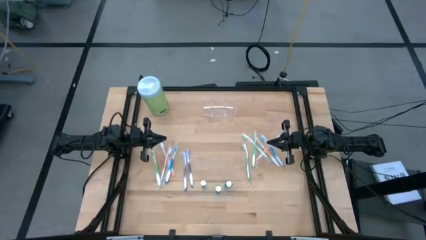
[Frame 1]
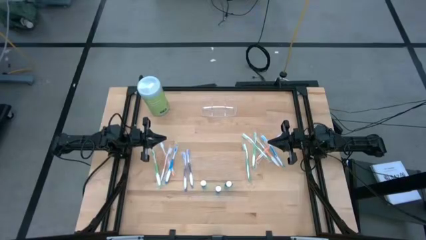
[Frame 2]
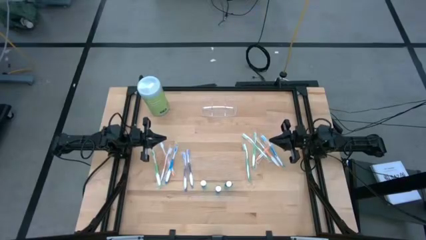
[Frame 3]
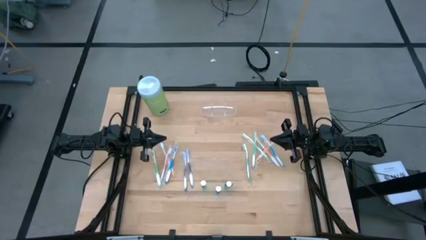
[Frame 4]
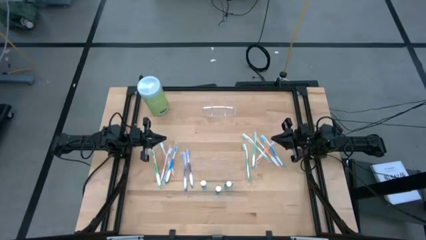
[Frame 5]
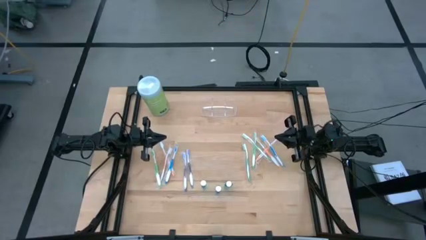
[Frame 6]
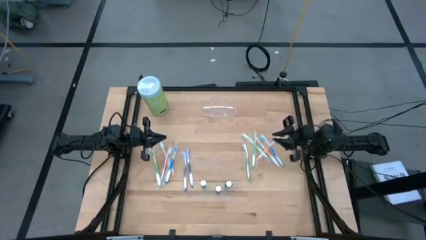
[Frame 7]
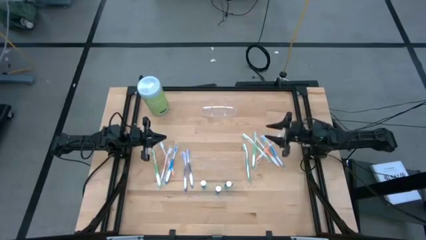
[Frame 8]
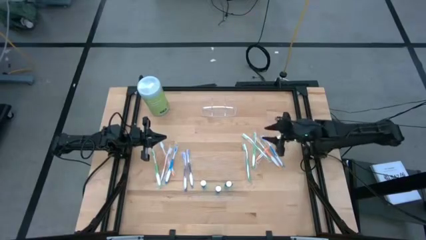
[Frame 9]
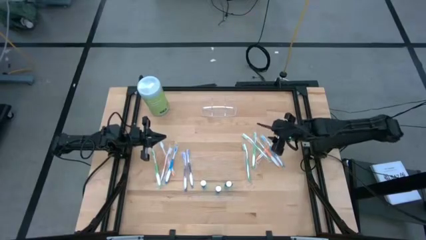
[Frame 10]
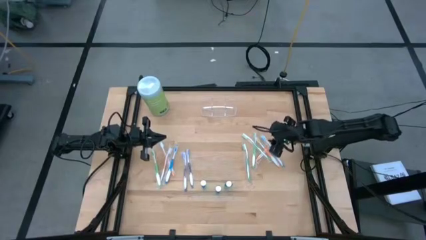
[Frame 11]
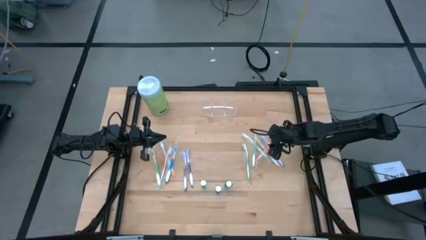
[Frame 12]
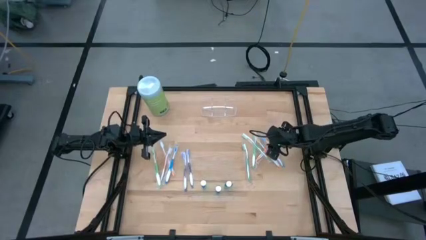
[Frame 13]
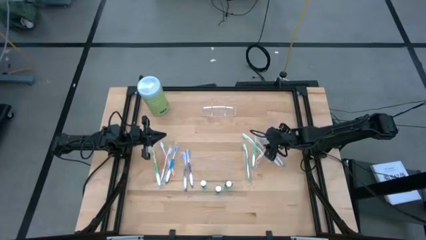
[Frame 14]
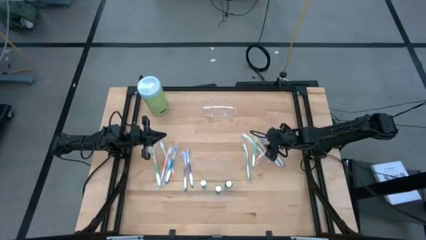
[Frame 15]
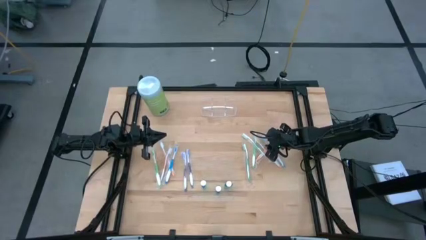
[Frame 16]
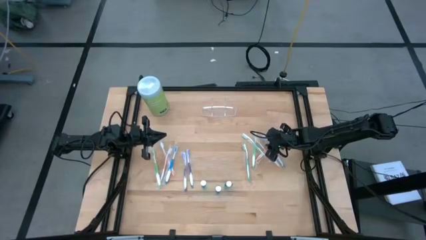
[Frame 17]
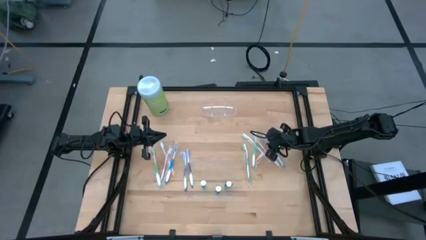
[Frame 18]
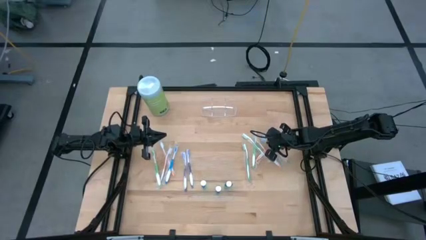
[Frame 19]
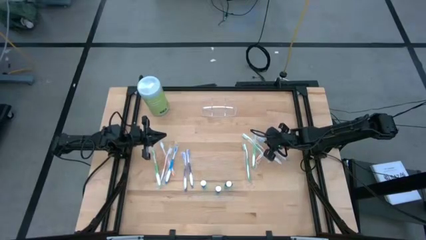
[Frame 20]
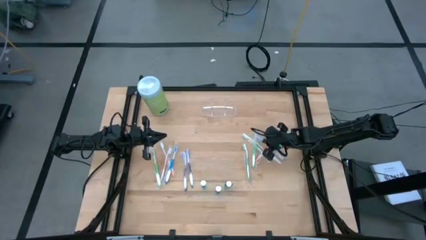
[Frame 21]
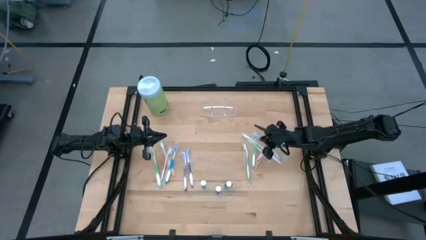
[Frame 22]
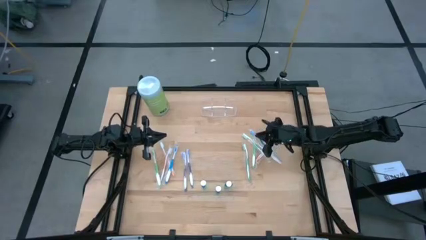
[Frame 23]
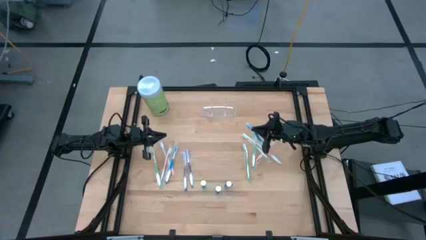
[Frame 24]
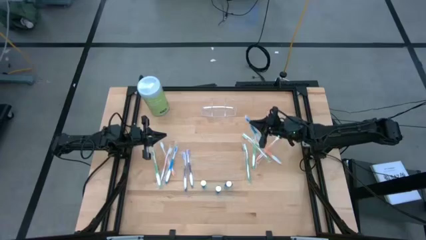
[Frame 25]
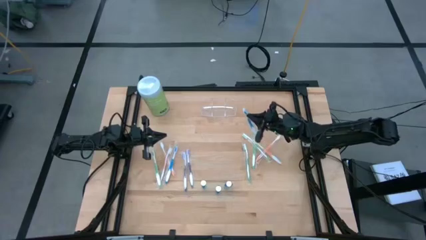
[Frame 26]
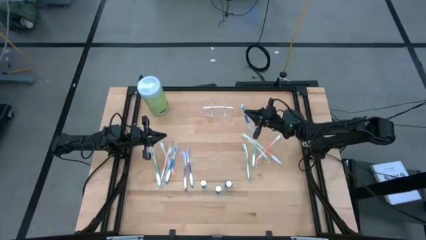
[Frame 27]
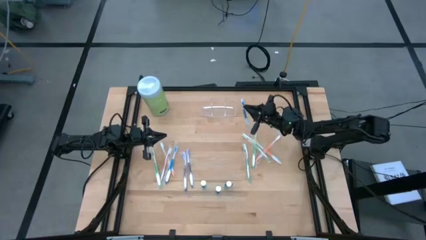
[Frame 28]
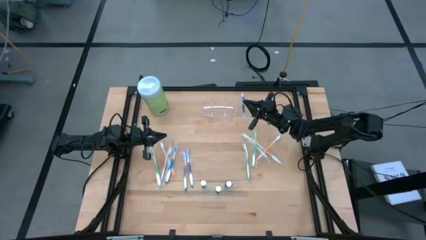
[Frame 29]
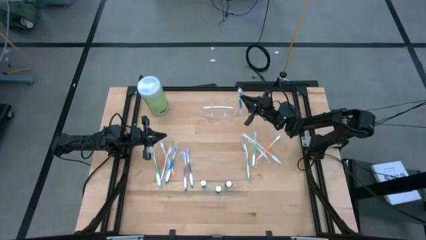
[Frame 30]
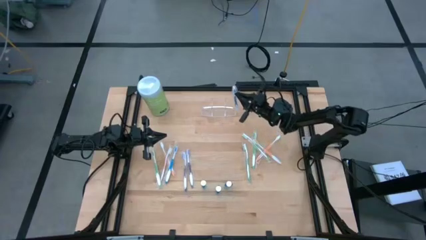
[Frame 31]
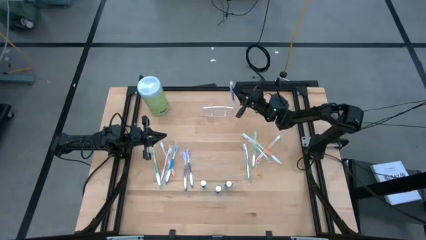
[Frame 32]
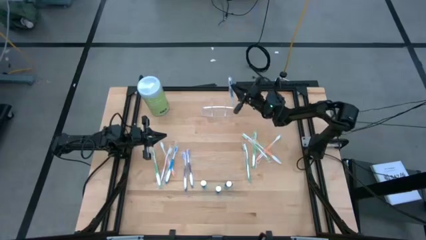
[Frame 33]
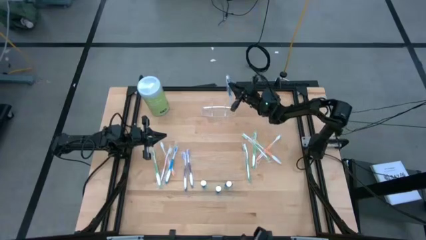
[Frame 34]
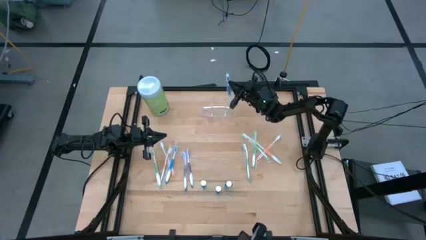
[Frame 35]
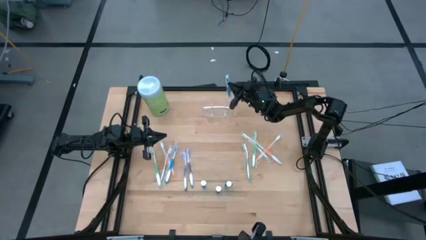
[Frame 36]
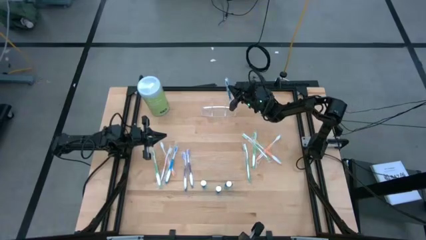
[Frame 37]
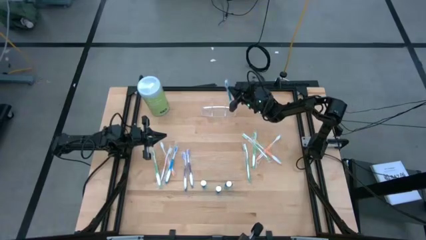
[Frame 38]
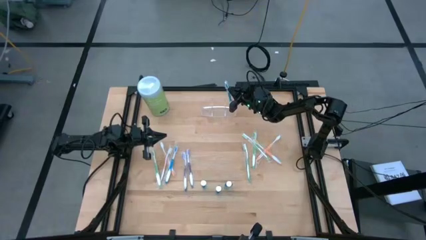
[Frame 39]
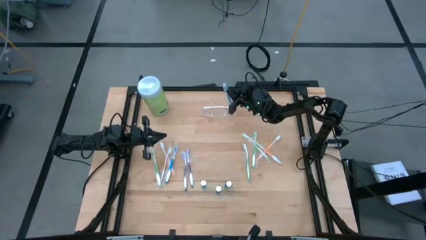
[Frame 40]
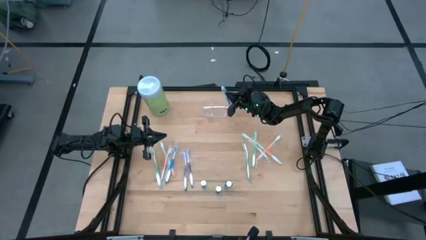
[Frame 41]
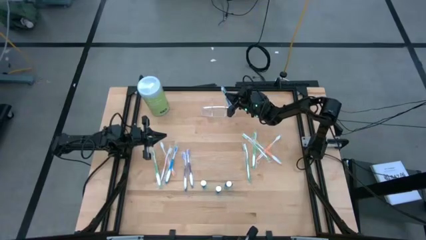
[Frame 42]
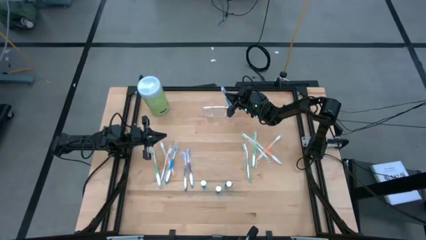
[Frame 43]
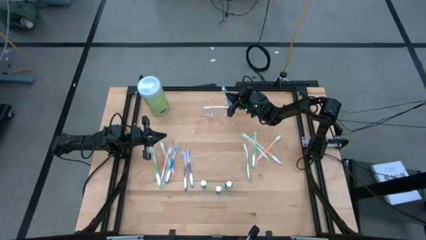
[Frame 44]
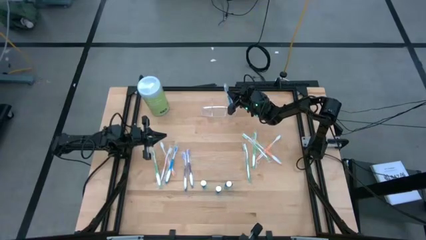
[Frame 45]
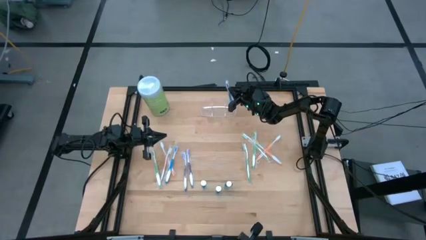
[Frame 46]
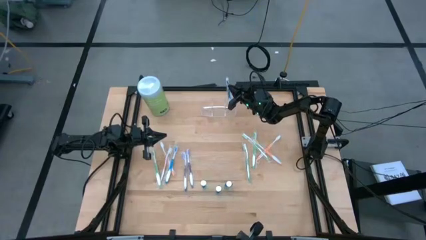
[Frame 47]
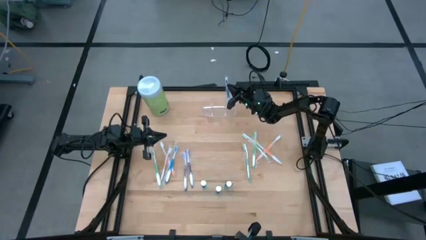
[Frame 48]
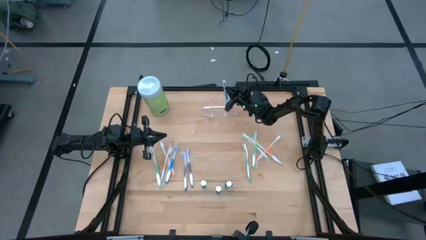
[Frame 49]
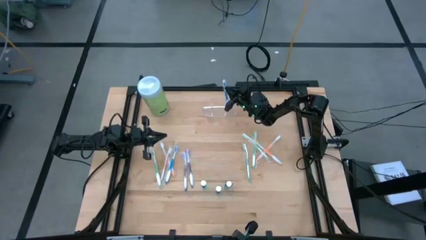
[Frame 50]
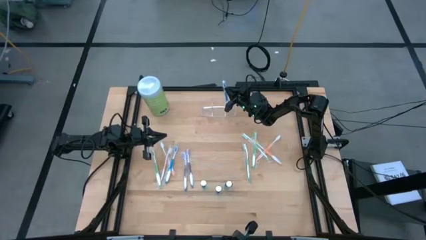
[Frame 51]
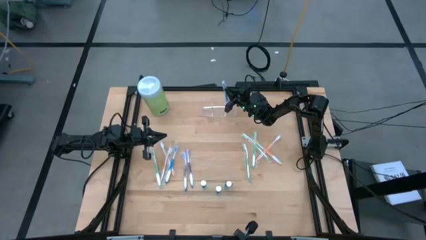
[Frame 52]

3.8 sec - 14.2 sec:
Task: Pick & Place toothbrushing station
Put the blue toothbrush into the transparent organizer

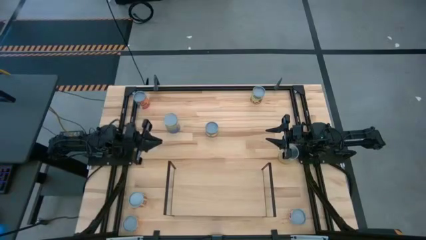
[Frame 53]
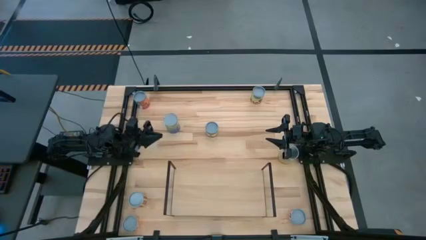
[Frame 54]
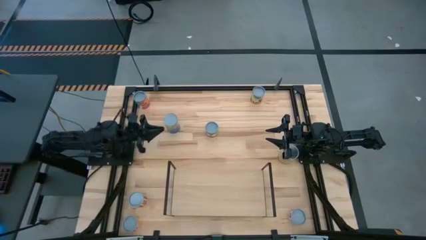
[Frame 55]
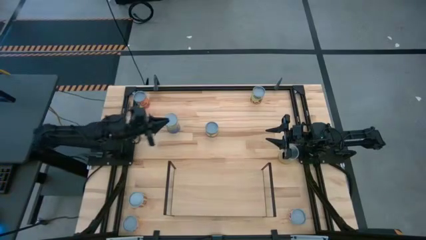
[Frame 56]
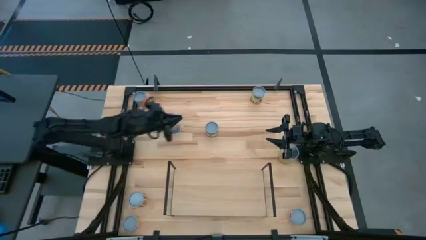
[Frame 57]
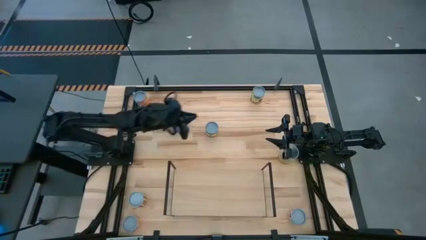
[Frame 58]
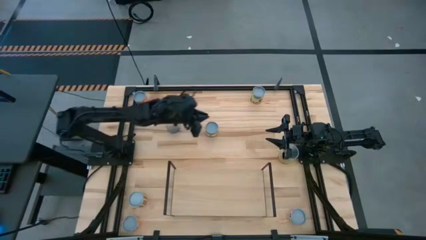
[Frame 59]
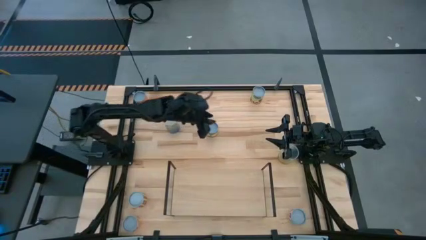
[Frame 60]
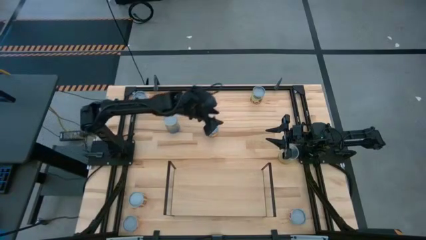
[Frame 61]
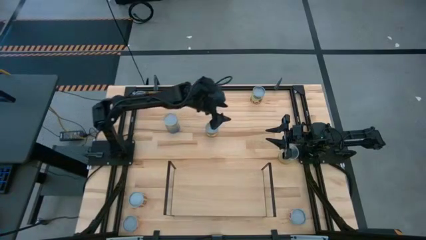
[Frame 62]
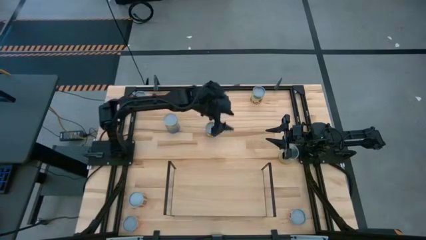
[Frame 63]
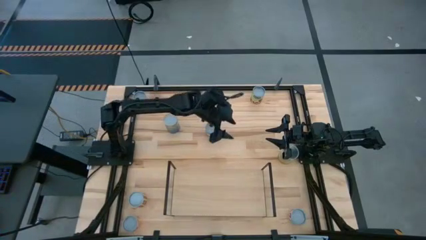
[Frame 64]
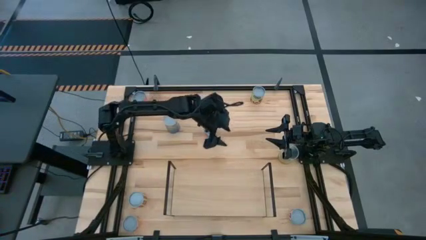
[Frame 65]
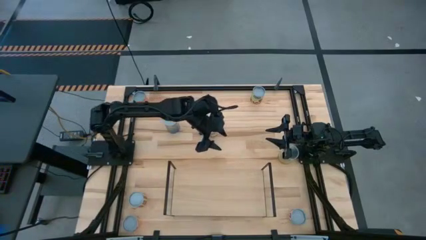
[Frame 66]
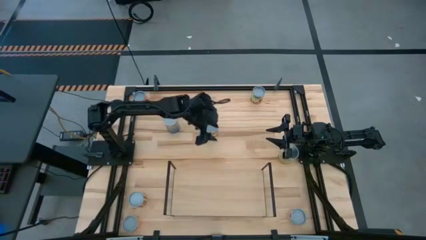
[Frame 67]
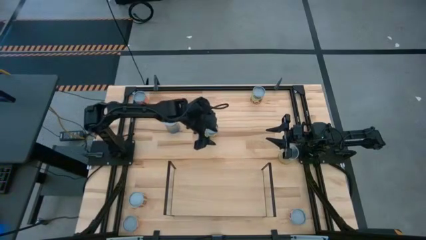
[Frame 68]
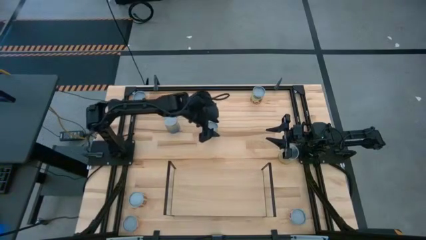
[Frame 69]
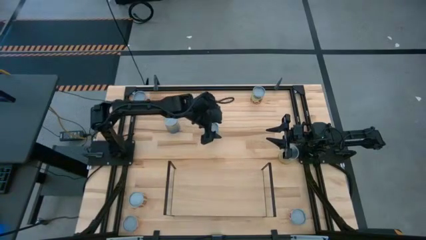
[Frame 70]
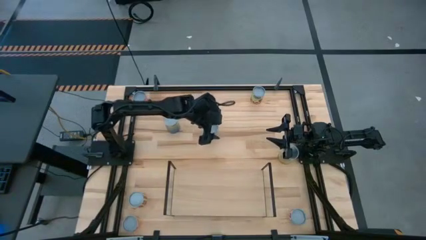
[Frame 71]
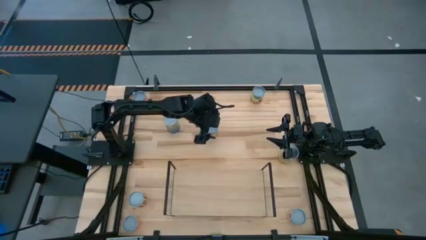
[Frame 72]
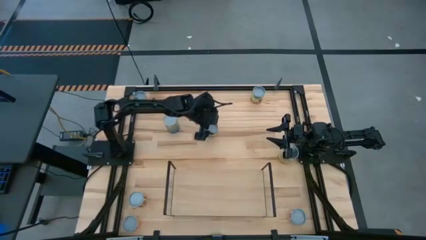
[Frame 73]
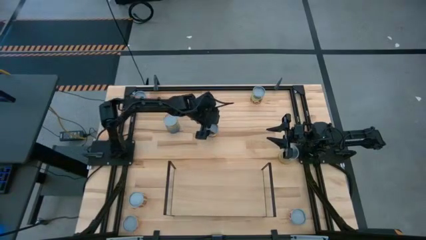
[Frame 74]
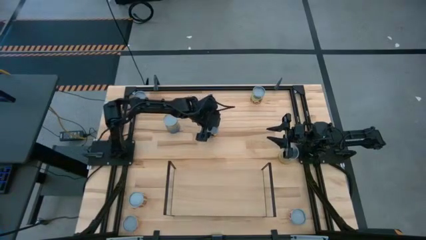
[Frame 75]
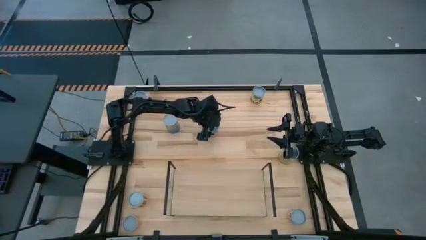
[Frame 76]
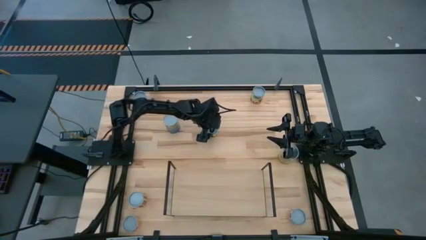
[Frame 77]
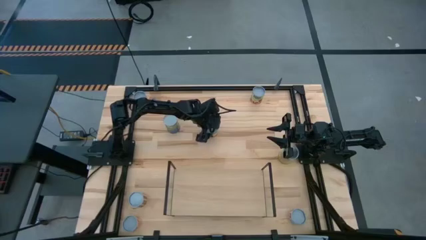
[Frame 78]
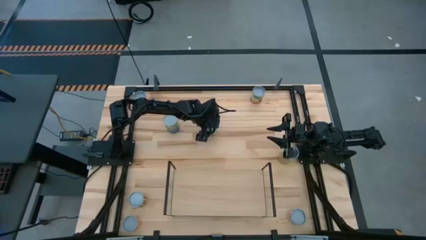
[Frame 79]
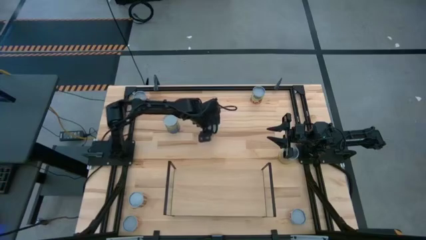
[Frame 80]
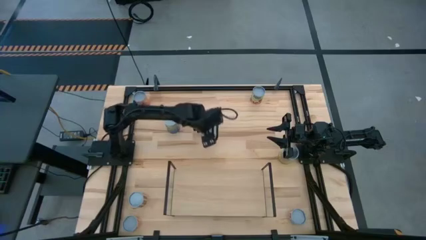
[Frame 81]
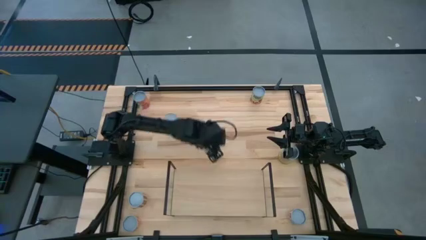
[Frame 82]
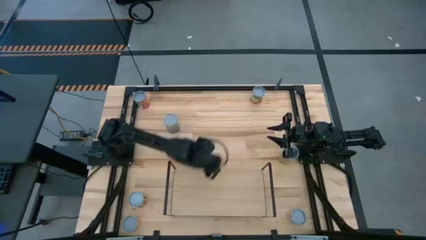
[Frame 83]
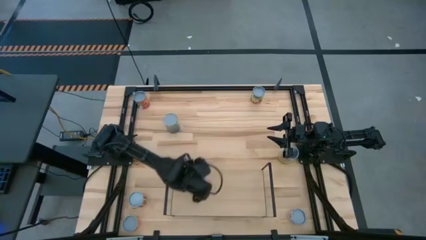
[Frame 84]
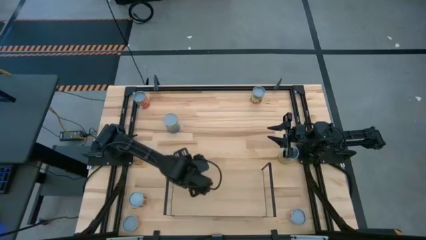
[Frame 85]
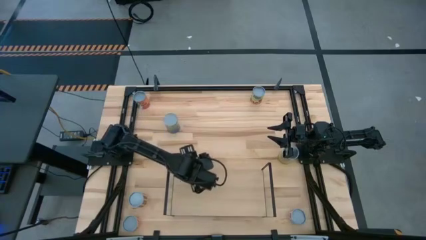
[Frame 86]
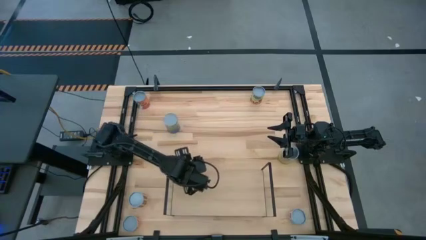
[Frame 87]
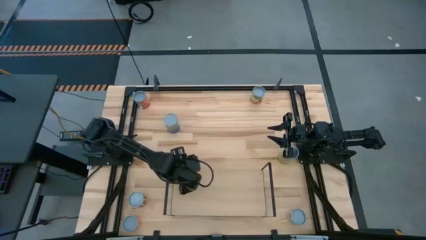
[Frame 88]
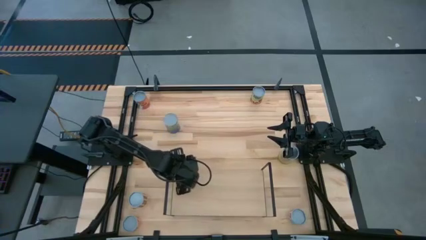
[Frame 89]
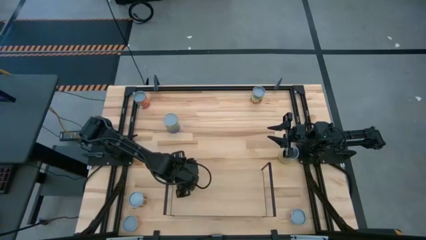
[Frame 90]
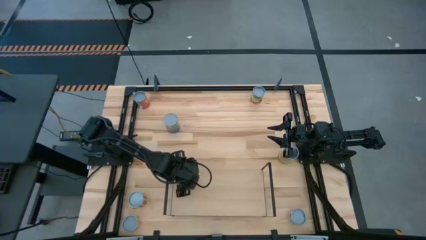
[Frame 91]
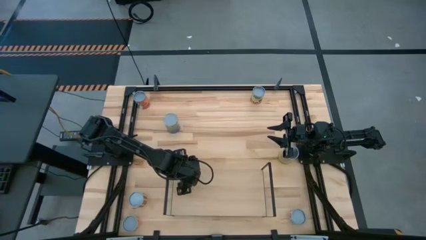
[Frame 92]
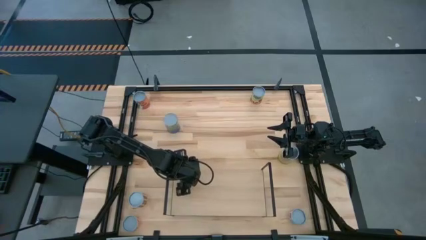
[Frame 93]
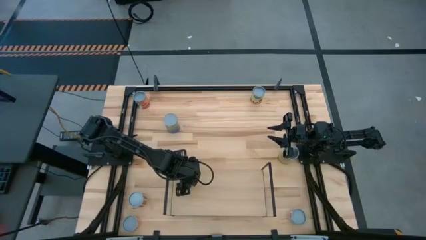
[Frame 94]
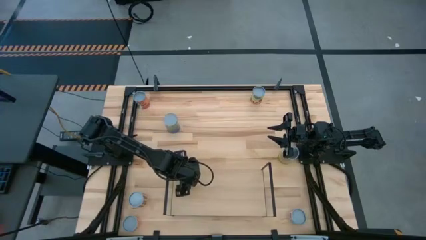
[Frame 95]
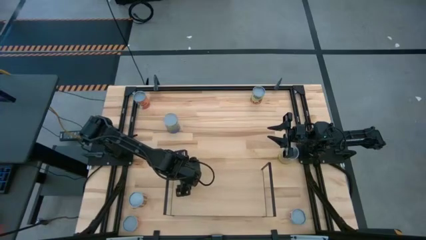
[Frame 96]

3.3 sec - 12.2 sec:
Task: Pick and place cans onto a shelf
Put the canned diced peaches on the shelf
